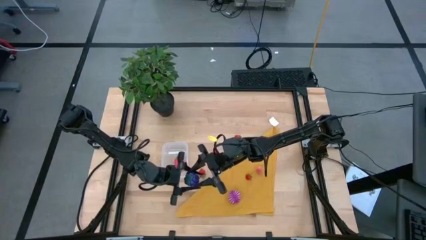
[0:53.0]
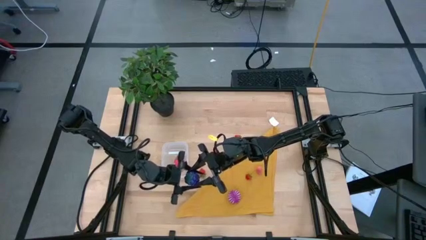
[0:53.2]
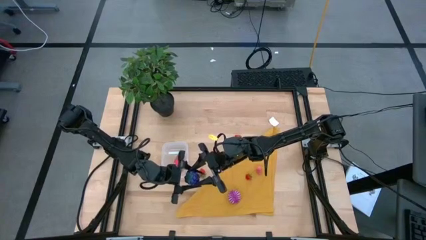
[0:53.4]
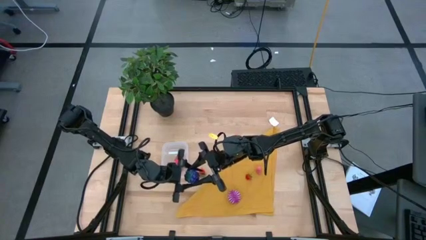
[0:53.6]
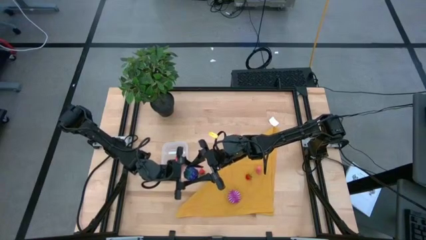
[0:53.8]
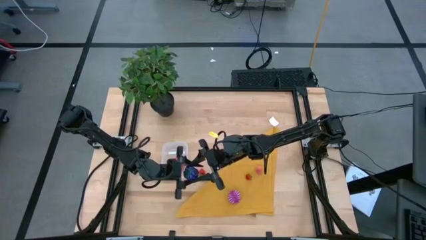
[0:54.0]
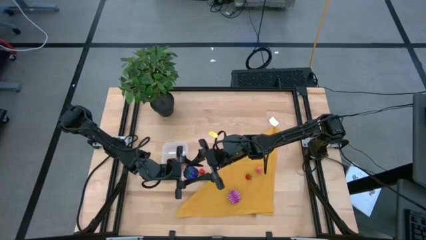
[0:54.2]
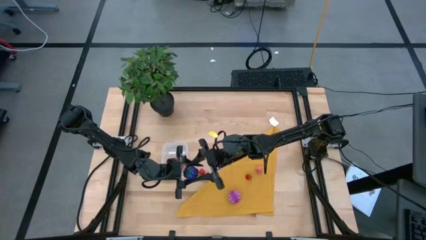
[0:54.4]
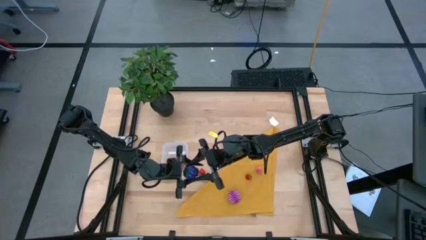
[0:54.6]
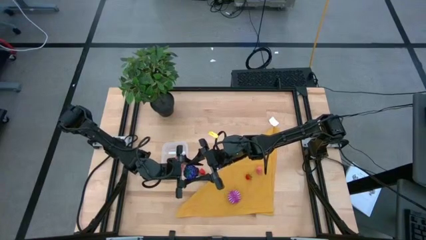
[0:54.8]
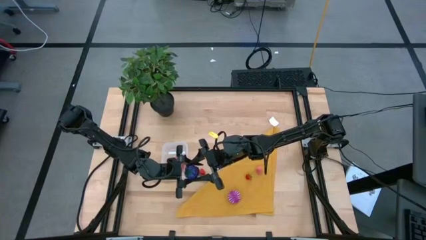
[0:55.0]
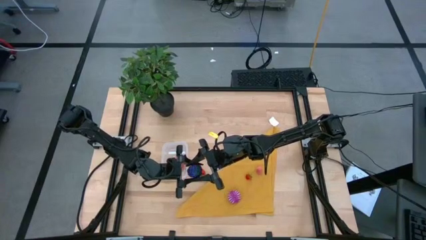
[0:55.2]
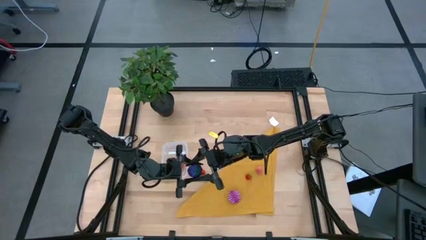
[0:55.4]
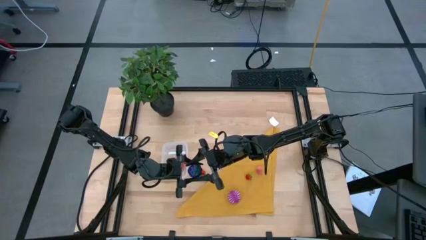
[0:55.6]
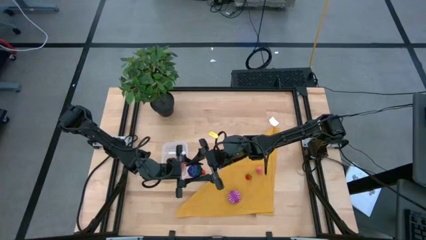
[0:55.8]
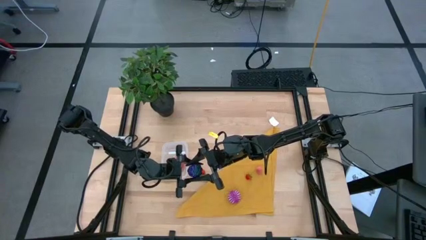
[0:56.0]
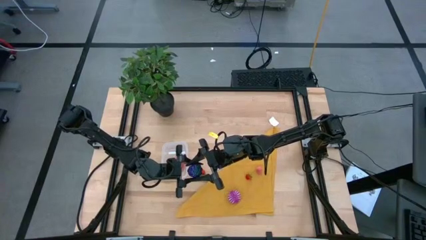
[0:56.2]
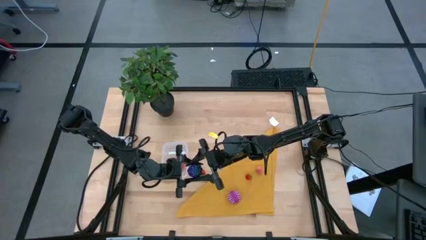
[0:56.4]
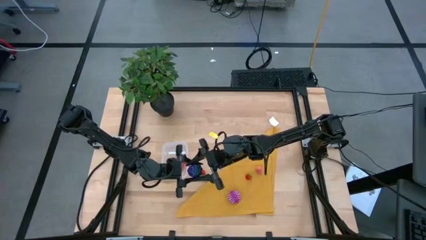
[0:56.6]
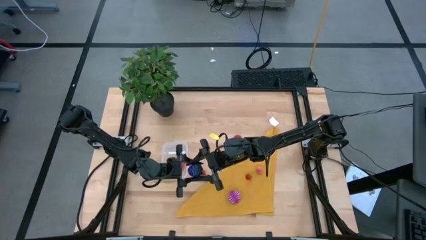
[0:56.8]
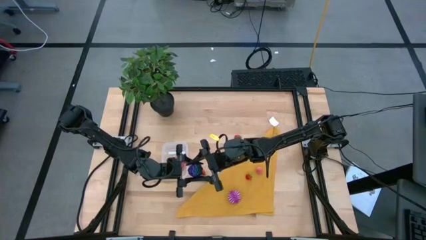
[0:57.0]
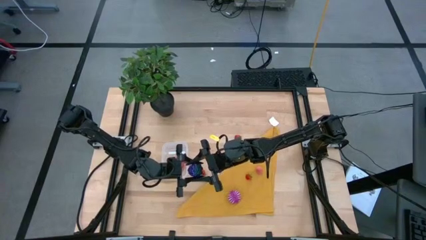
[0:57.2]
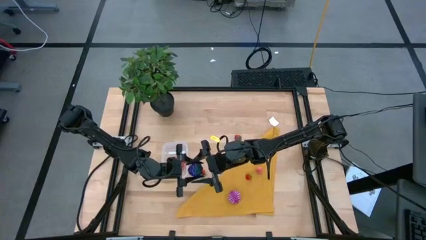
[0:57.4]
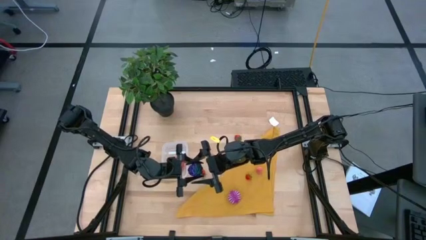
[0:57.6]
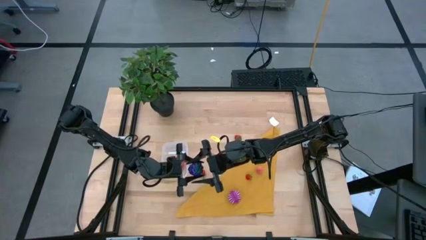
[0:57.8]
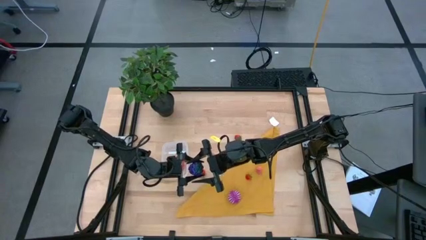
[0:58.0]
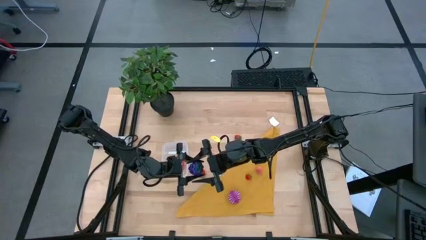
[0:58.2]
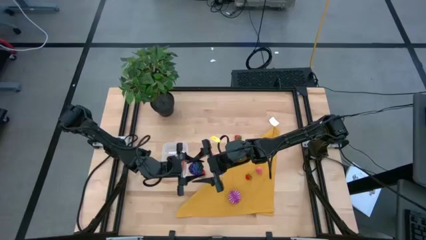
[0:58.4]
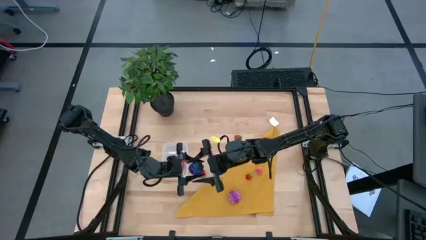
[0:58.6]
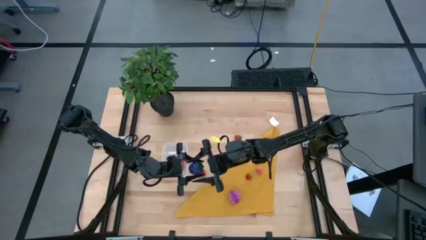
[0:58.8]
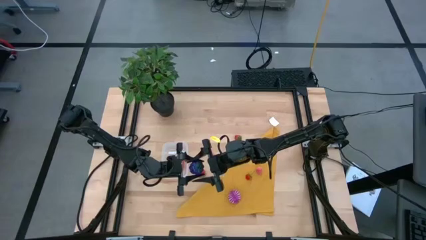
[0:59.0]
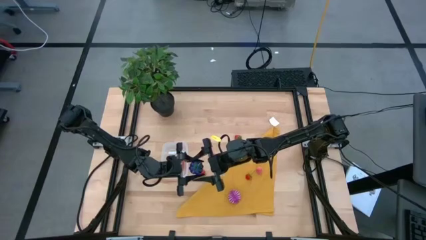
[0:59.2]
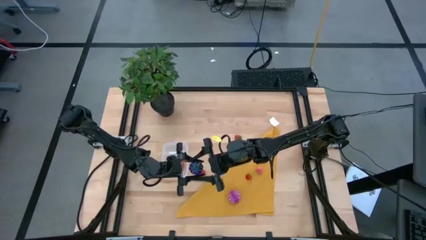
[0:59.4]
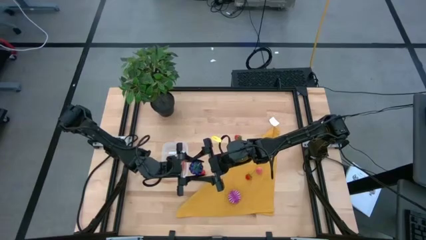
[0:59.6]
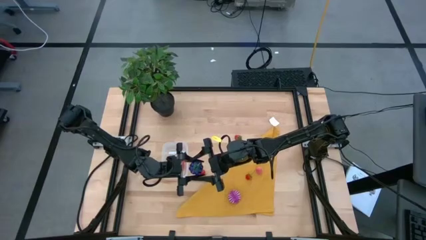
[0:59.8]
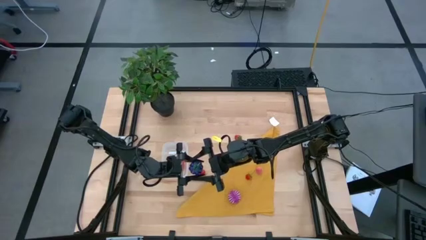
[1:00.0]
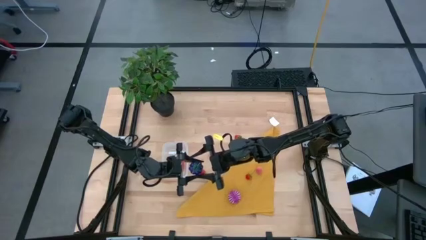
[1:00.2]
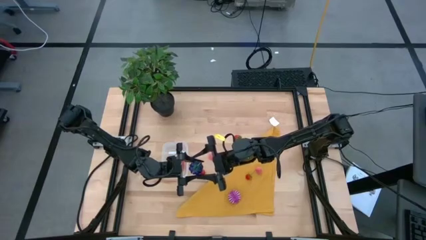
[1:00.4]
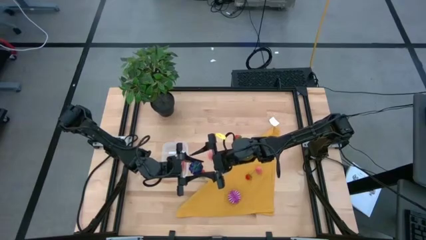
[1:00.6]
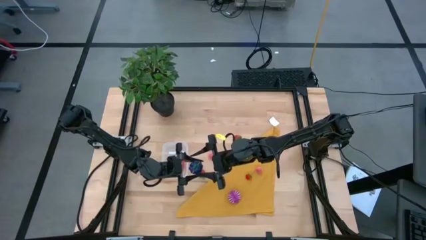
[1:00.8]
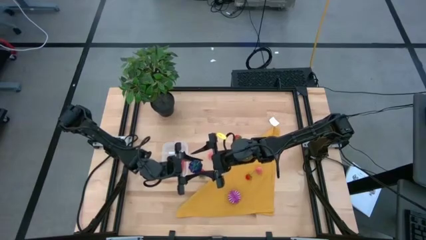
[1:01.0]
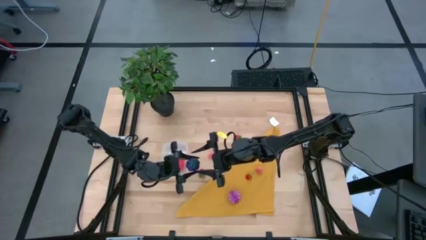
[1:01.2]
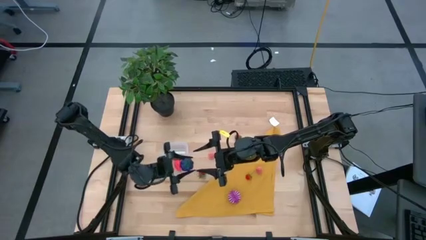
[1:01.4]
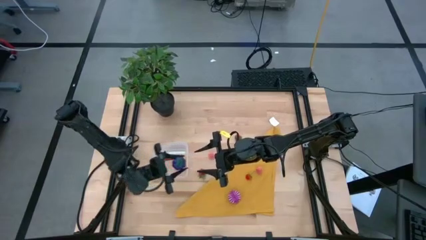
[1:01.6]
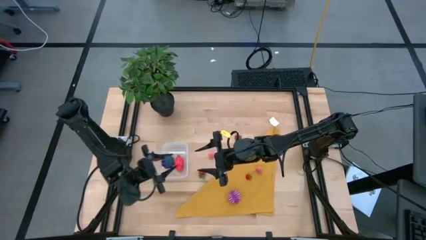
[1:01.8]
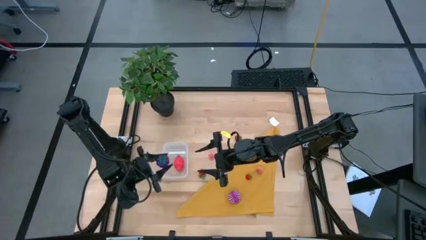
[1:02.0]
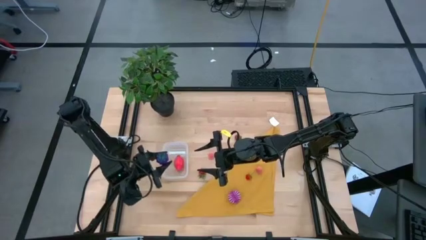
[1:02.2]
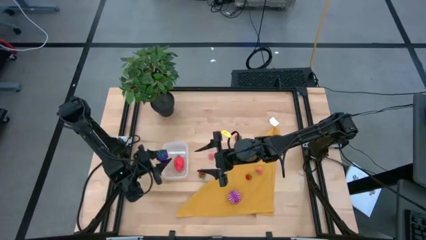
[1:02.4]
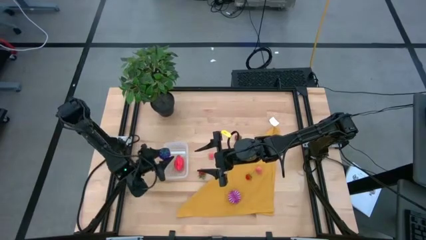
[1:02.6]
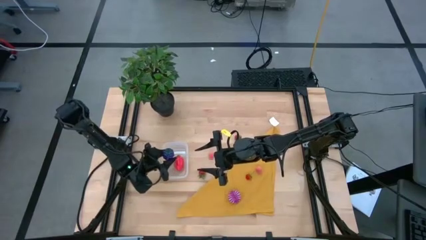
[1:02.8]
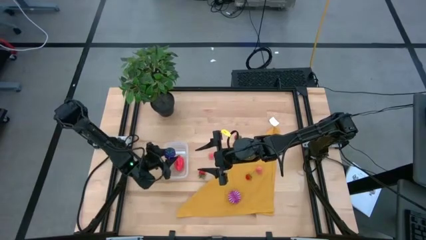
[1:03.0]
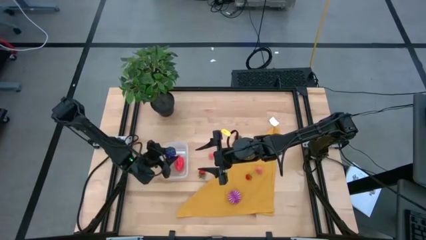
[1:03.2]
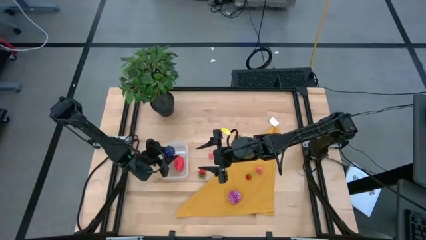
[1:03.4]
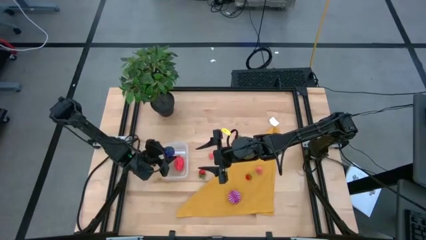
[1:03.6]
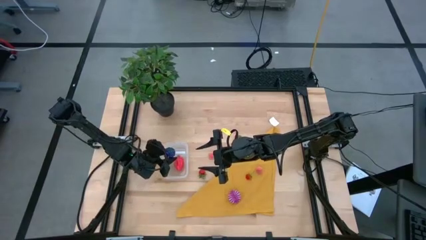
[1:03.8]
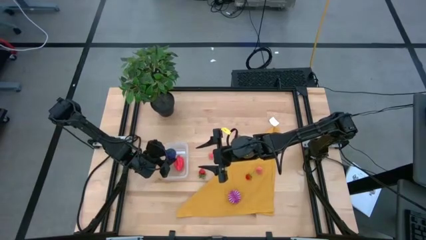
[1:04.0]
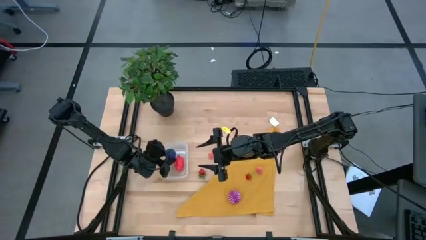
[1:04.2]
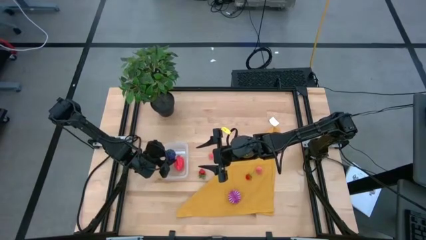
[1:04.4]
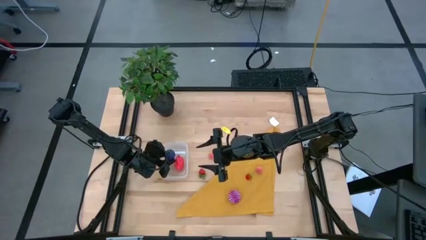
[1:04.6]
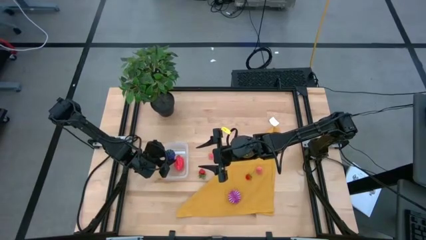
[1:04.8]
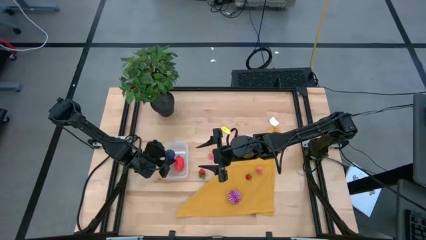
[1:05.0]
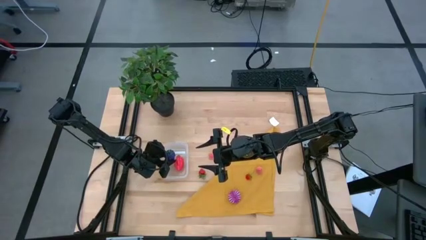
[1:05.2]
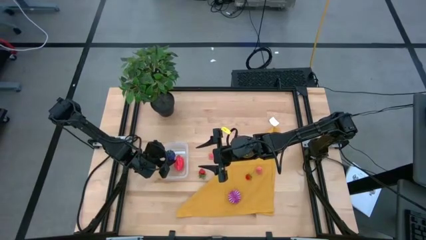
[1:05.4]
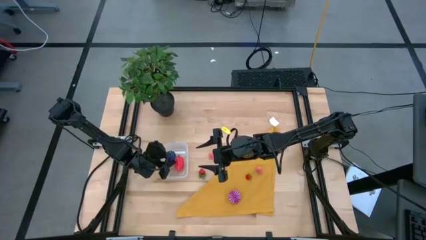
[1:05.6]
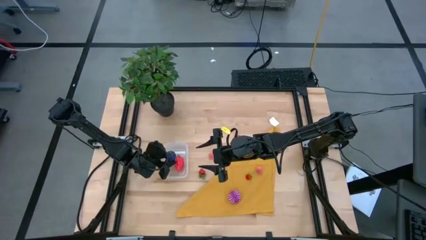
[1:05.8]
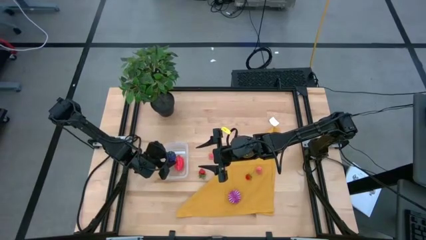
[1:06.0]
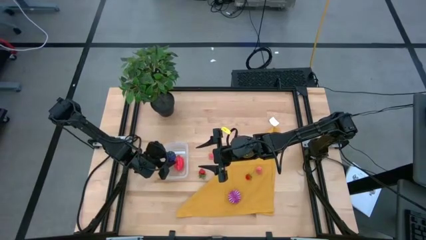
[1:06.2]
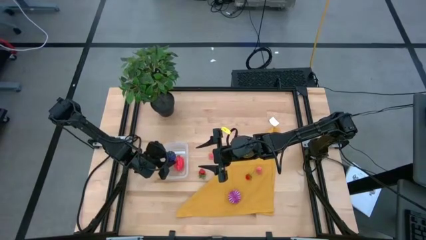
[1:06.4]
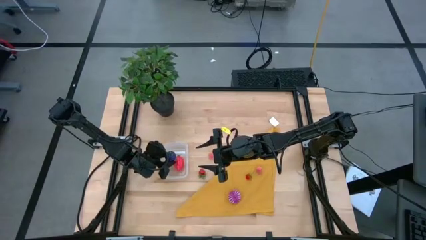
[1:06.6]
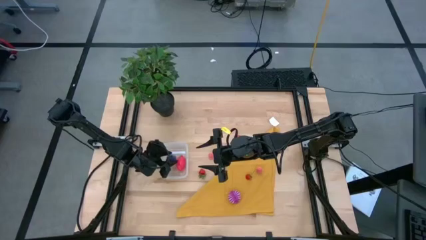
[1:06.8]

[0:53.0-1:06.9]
Task: Pick and placing Produce into tupperware
Put the purple grapes into the transparent bin
